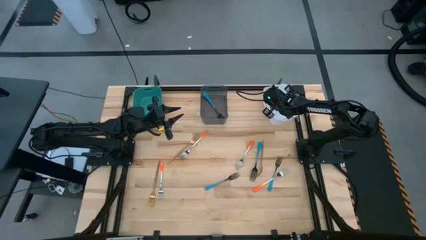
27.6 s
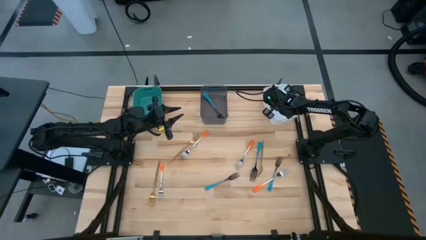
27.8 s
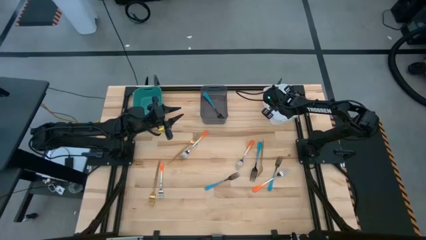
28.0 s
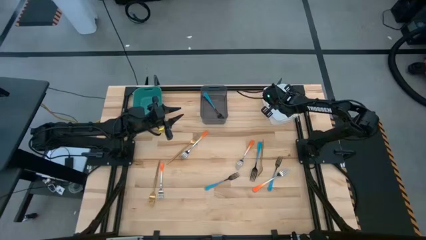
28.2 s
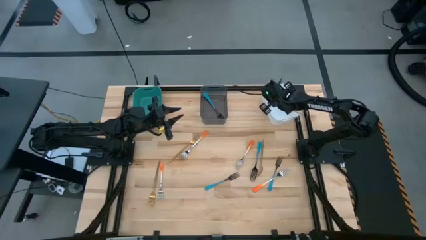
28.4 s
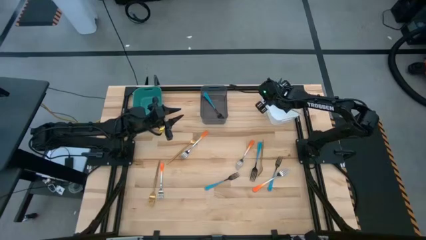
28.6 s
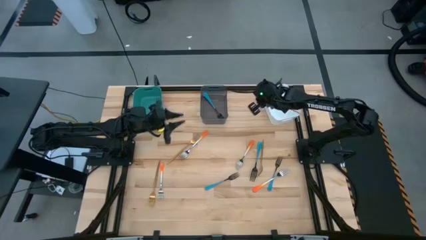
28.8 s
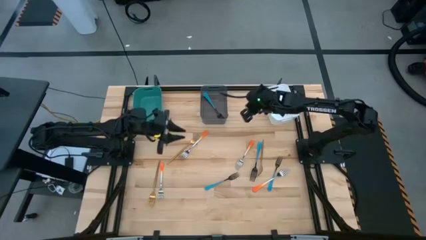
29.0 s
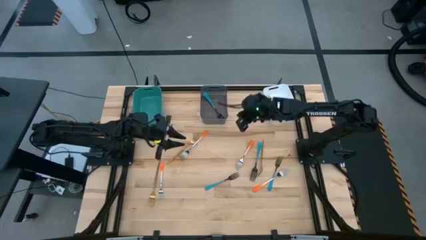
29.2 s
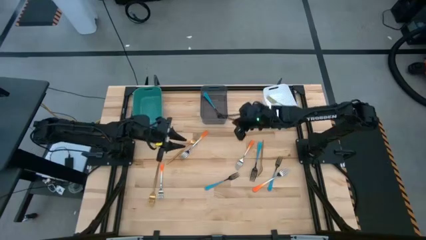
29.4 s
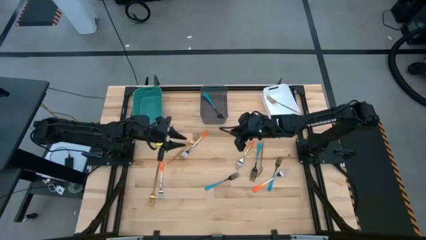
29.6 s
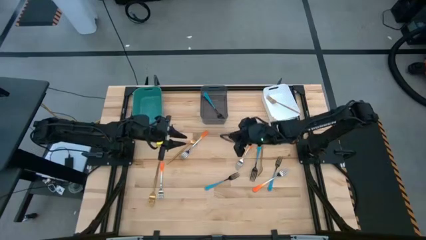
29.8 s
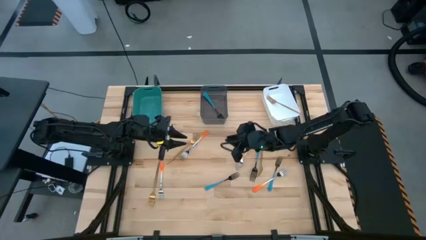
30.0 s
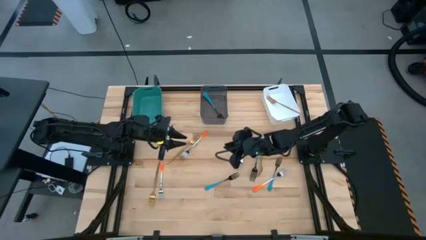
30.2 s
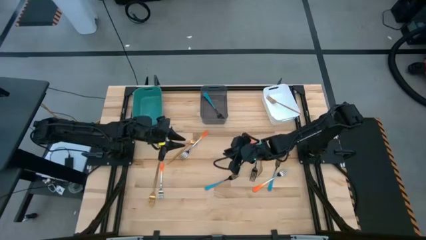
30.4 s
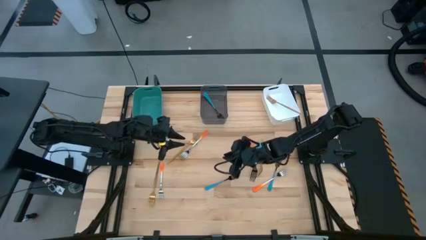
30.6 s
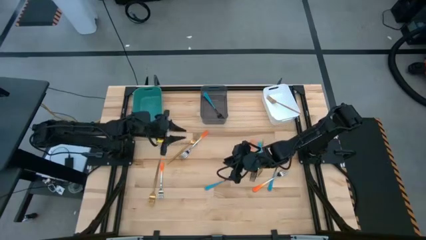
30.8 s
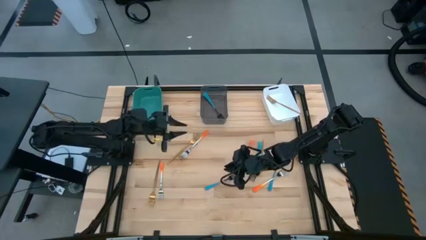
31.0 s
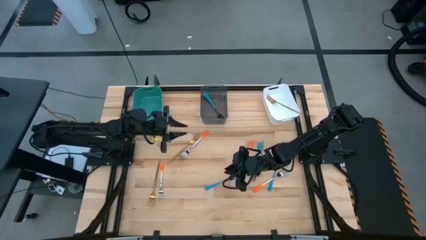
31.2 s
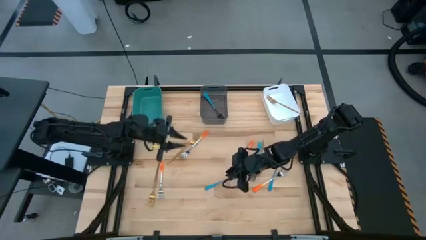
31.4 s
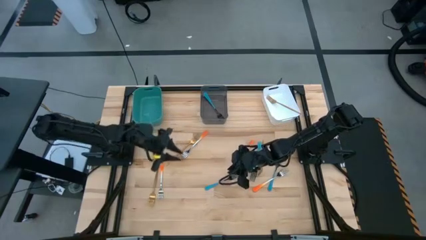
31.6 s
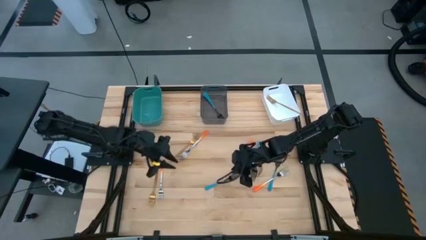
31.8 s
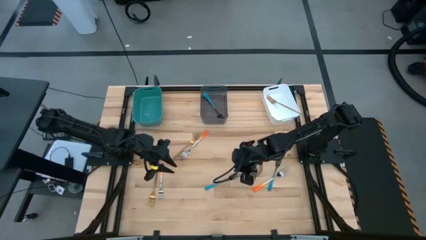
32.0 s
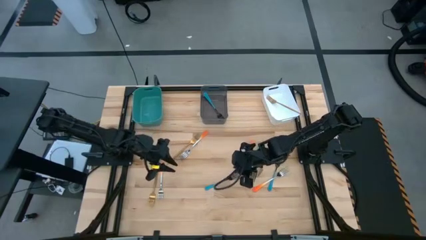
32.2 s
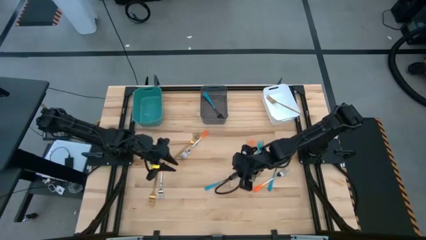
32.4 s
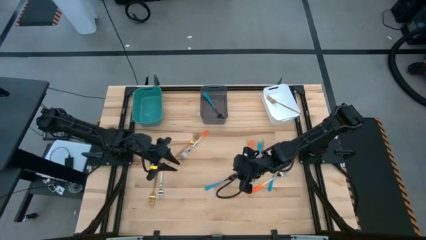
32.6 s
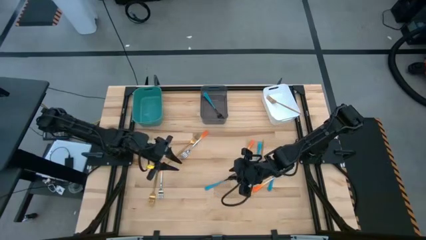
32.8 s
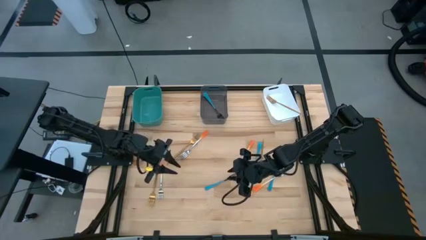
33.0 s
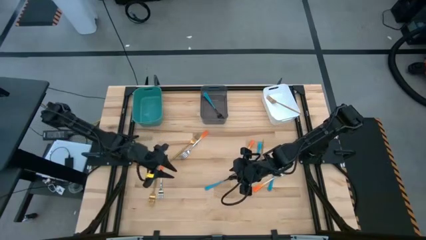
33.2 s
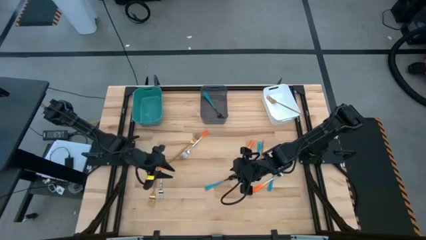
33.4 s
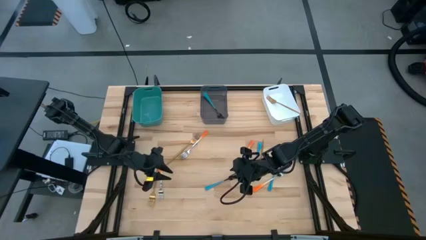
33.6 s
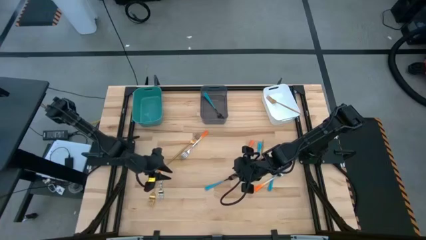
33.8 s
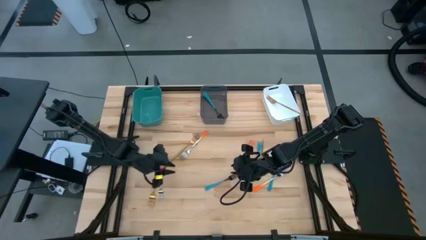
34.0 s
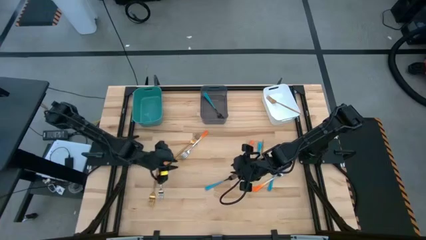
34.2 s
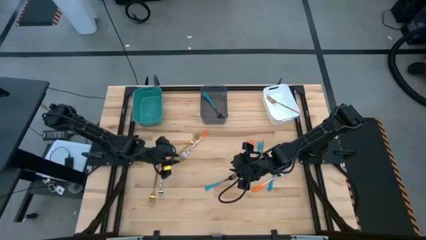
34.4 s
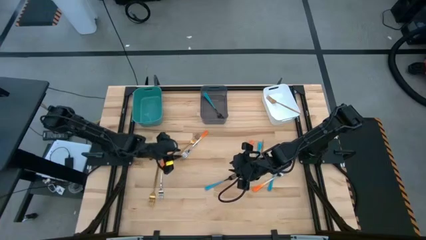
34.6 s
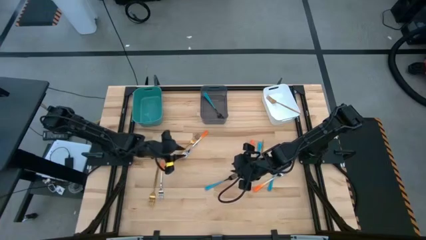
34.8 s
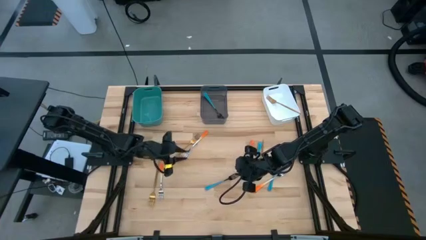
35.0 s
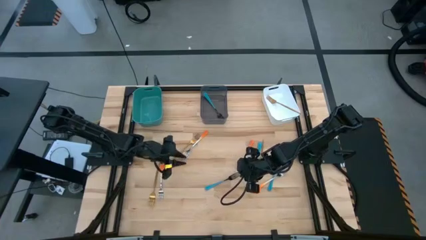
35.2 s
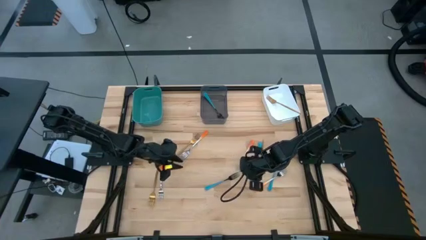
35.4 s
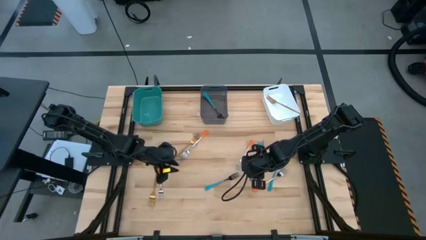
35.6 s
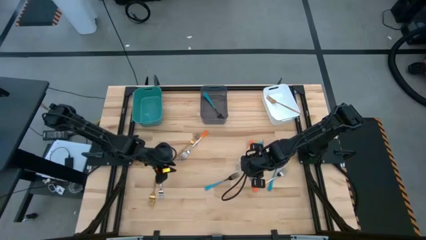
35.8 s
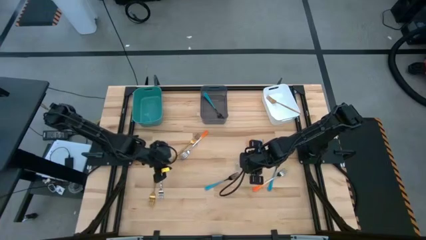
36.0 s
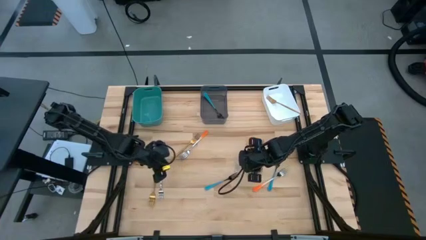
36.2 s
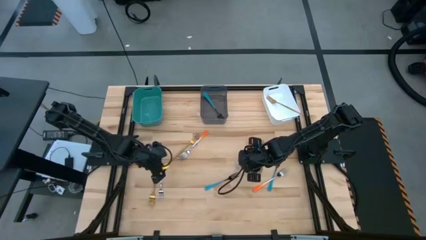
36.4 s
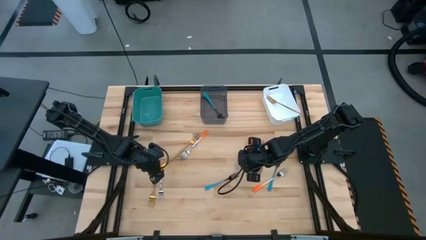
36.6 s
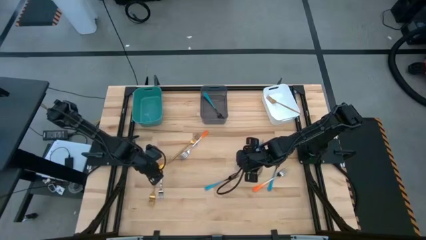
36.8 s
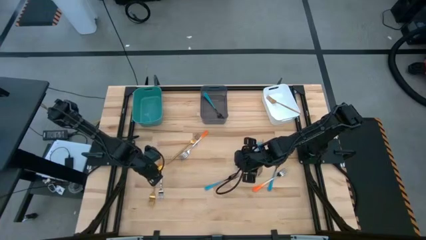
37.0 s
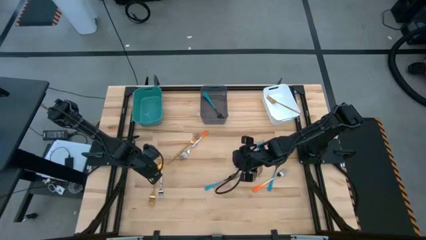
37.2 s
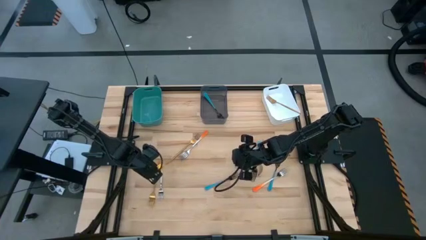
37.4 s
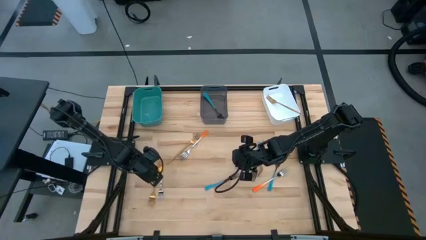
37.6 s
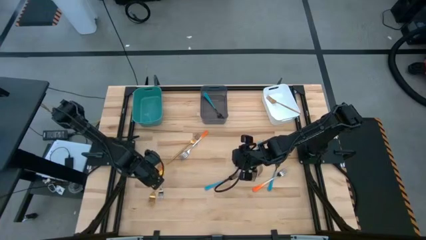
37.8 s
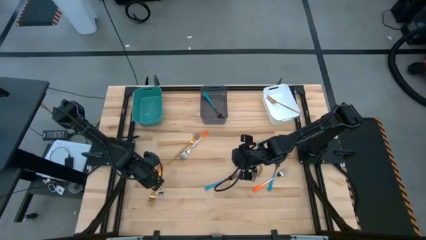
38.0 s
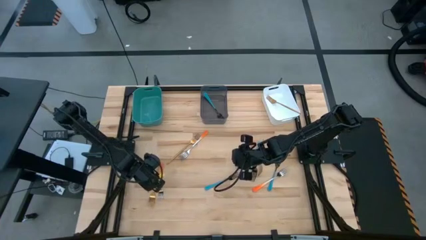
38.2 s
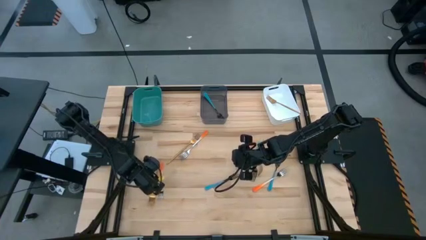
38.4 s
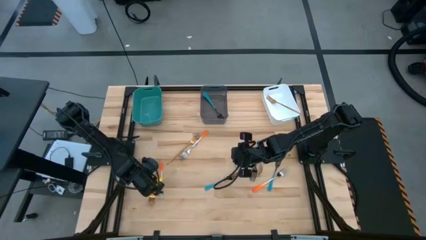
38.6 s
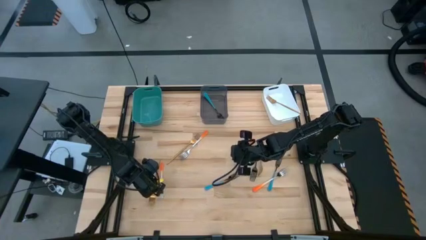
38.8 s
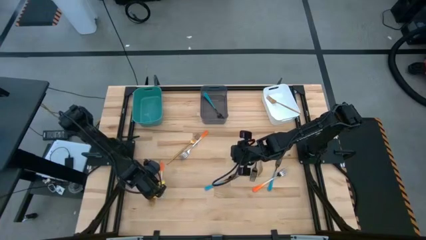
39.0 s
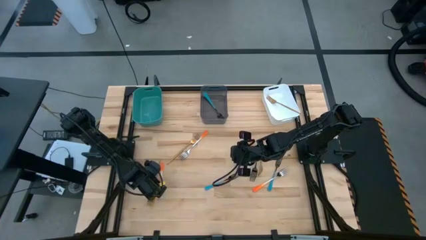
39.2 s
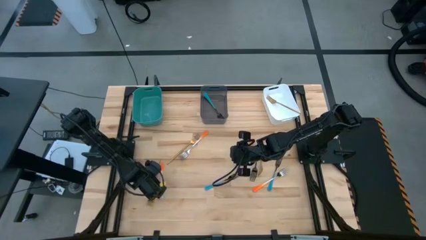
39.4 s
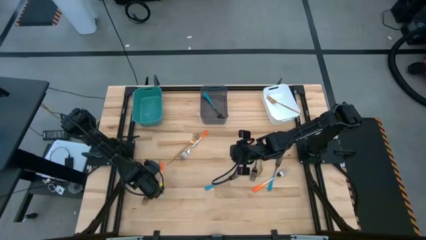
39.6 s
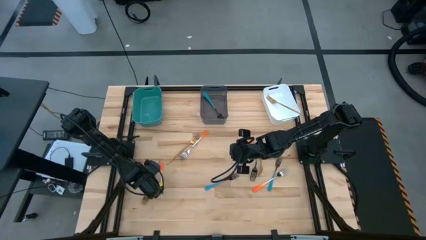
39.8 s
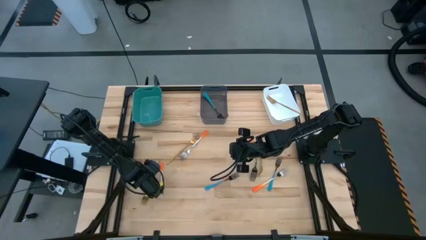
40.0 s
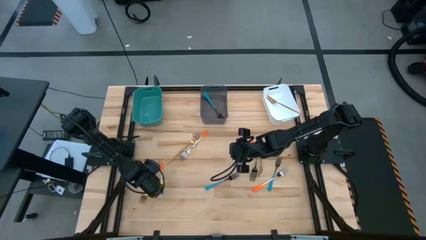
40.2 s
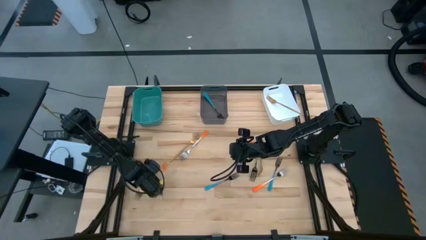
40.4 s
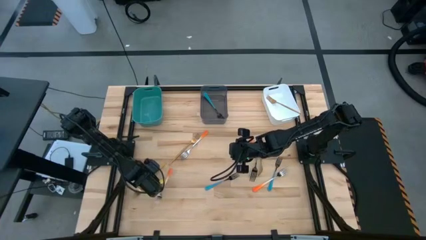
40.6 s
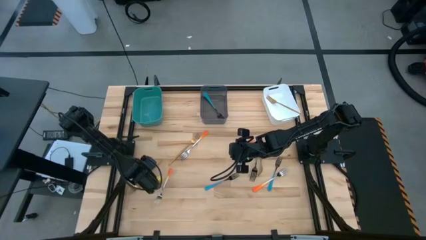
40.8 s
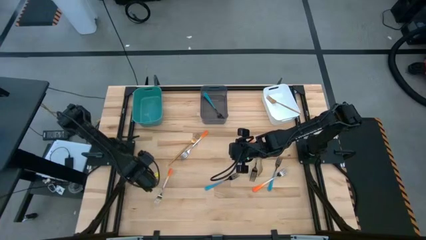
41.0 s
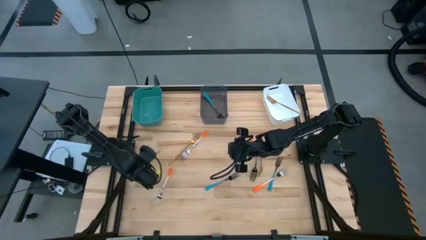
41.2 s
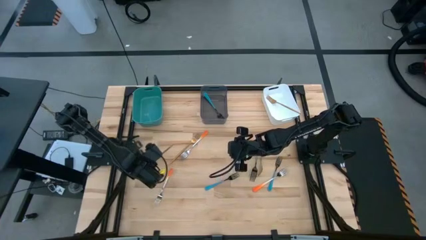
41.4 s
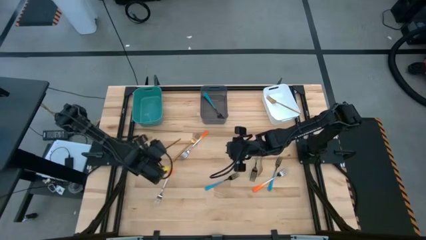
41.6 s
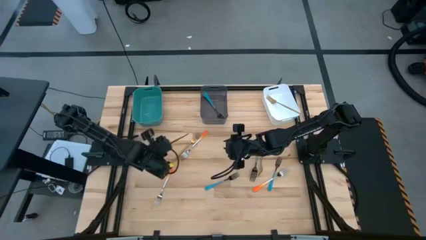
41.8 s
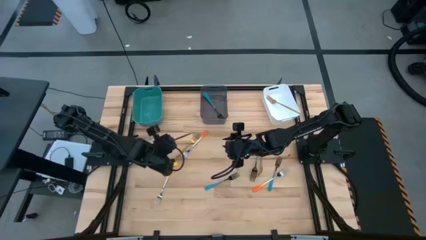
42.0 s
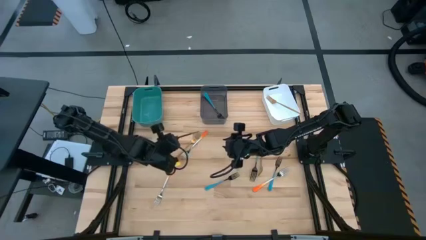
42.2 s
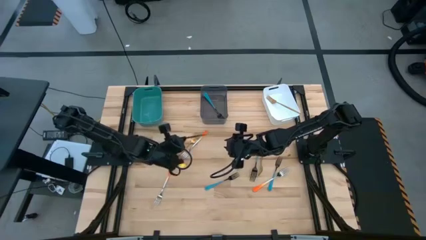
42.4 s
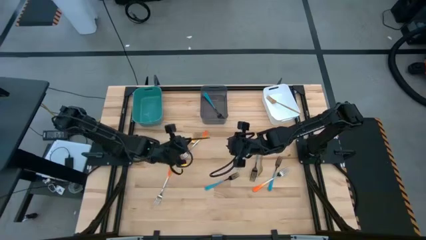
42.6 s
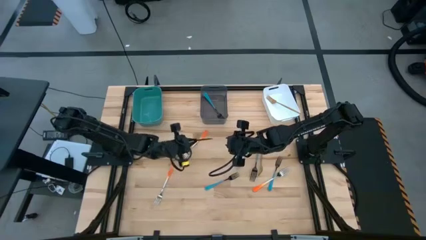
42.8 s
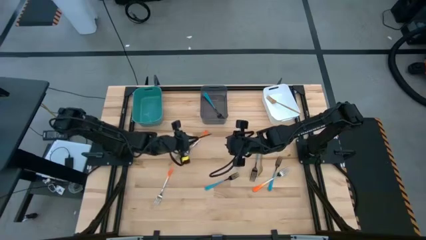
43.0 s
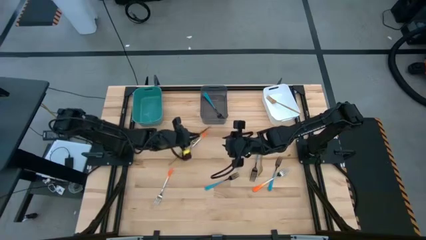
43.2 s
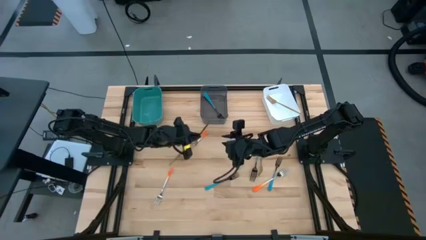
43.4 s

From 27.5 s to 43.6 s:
Task: Sort silverware by color (type)
Put the bottom left gold fork into the white bin
